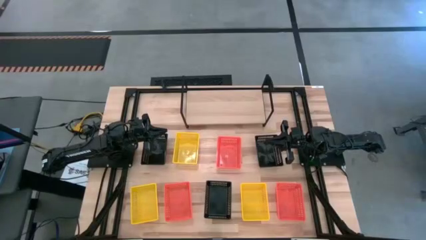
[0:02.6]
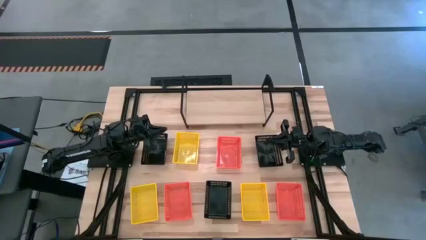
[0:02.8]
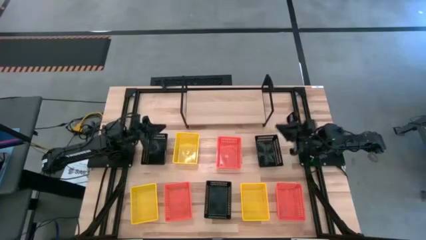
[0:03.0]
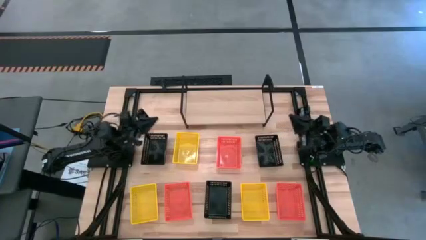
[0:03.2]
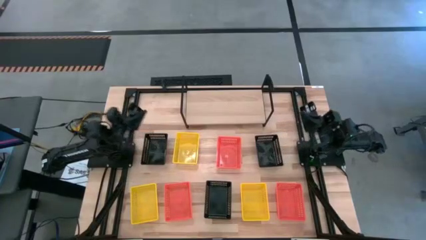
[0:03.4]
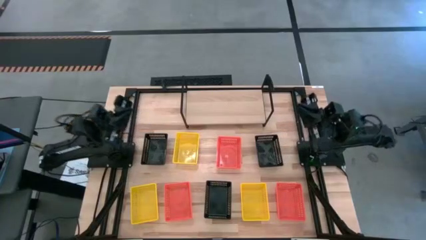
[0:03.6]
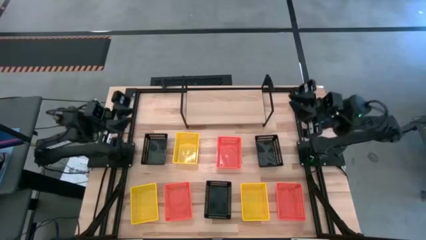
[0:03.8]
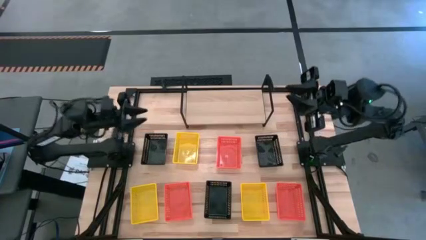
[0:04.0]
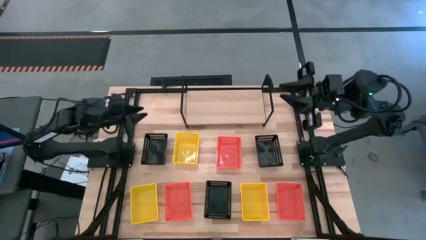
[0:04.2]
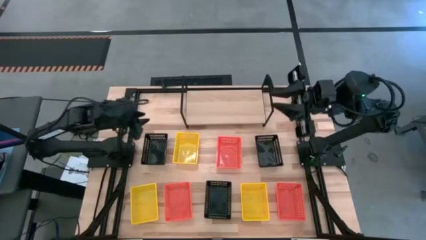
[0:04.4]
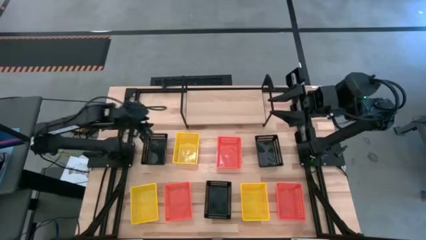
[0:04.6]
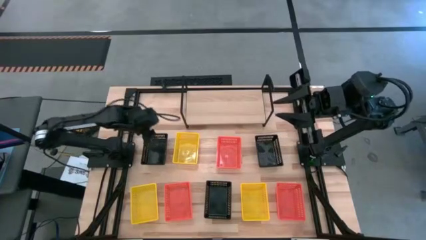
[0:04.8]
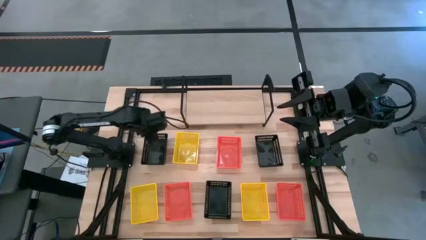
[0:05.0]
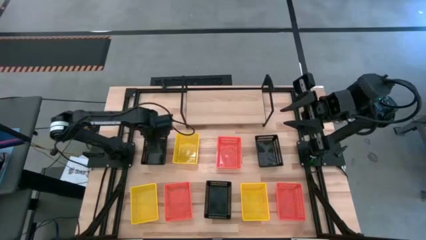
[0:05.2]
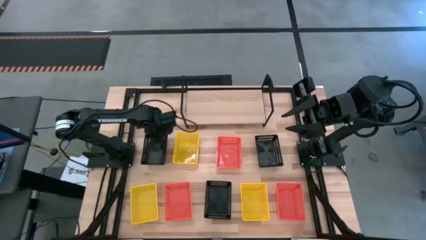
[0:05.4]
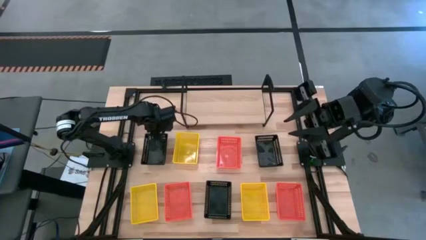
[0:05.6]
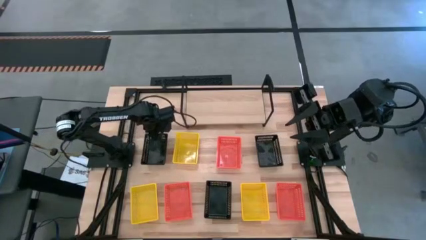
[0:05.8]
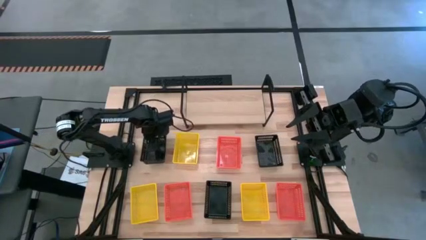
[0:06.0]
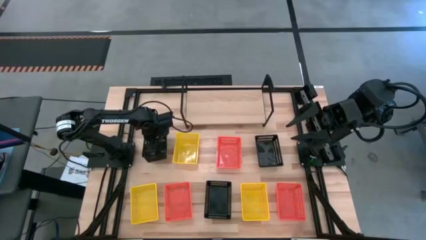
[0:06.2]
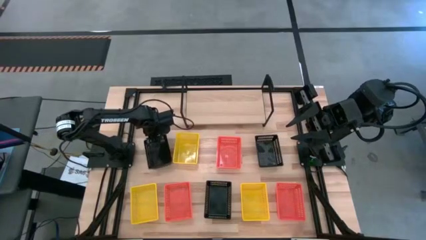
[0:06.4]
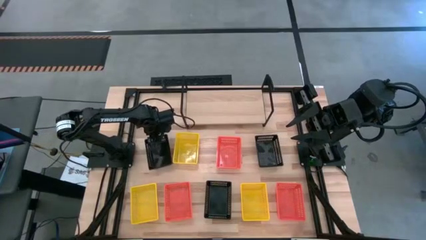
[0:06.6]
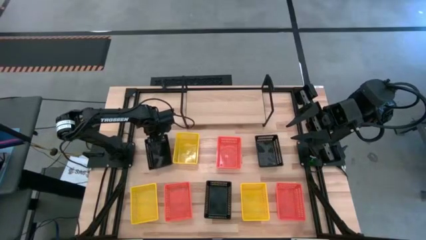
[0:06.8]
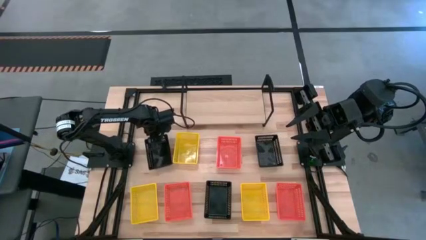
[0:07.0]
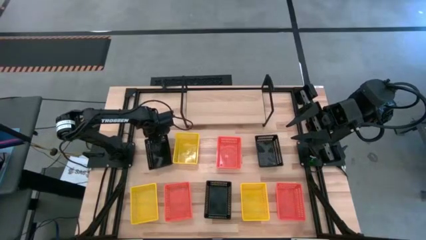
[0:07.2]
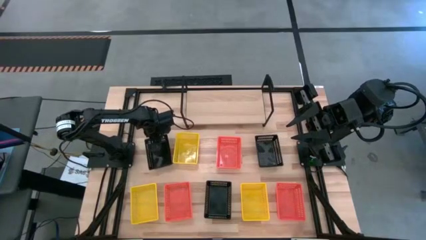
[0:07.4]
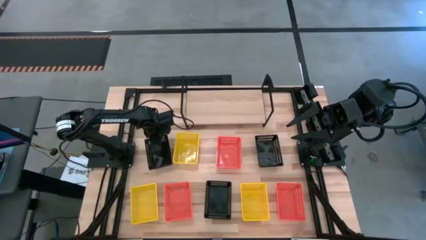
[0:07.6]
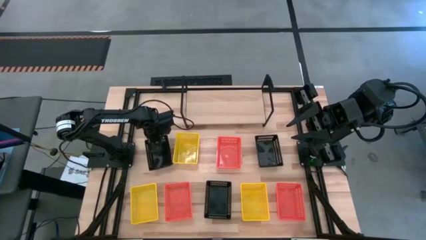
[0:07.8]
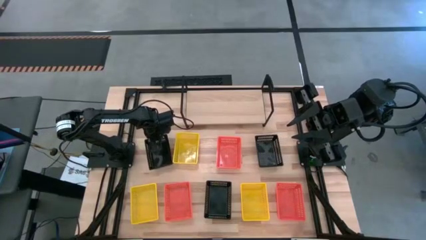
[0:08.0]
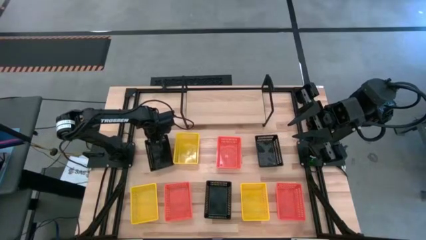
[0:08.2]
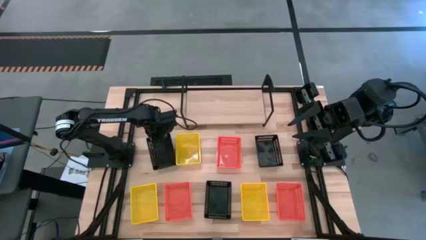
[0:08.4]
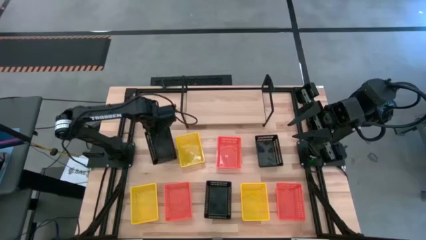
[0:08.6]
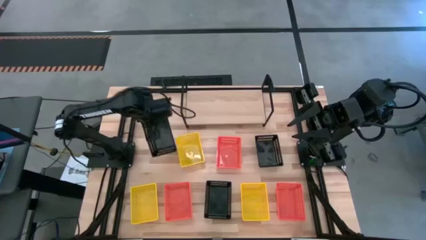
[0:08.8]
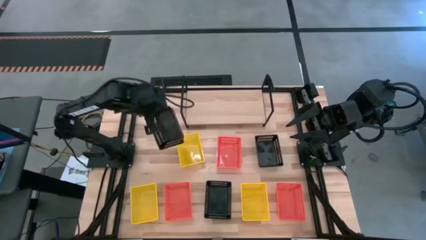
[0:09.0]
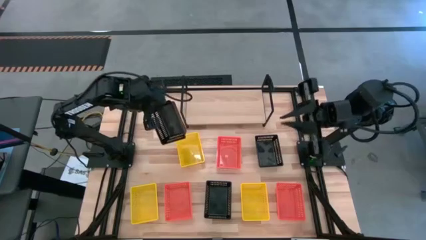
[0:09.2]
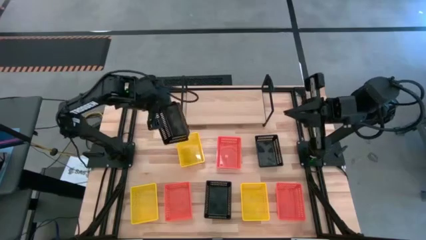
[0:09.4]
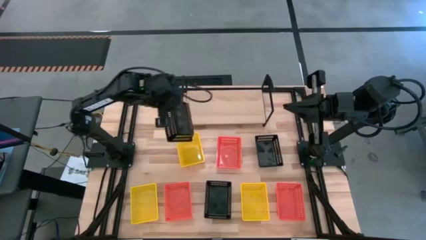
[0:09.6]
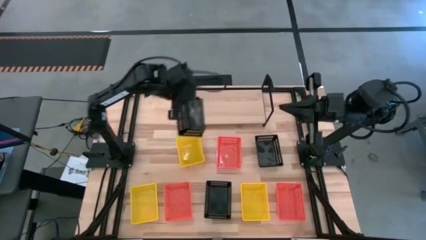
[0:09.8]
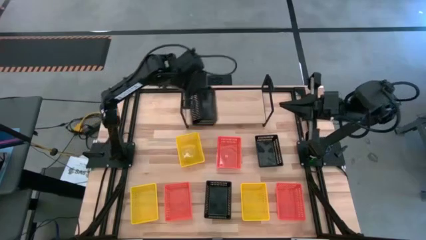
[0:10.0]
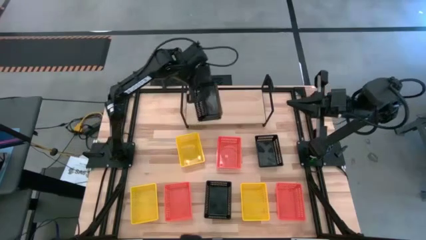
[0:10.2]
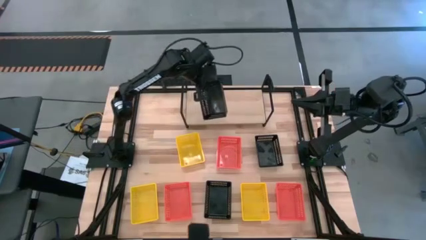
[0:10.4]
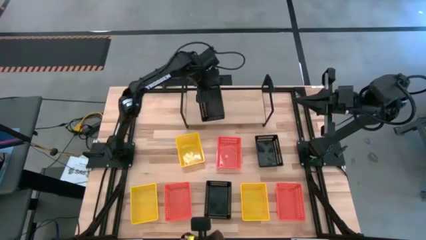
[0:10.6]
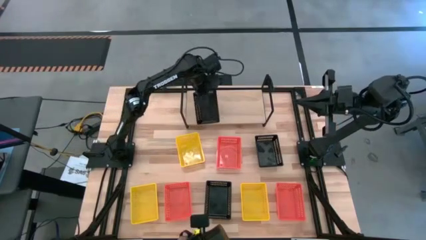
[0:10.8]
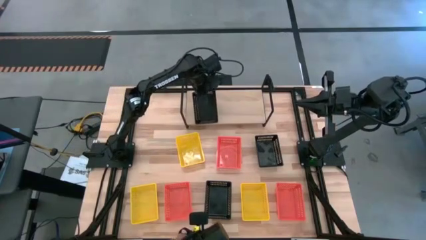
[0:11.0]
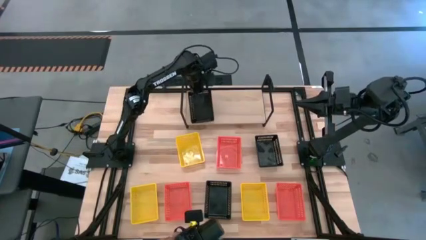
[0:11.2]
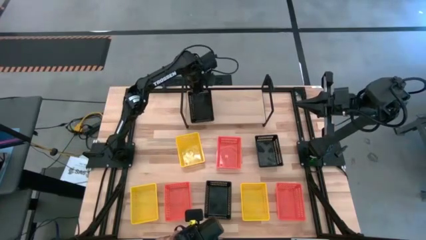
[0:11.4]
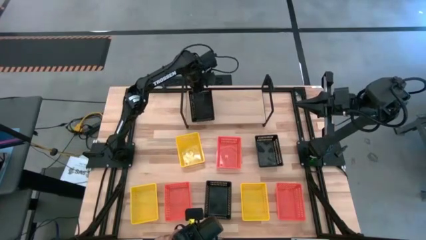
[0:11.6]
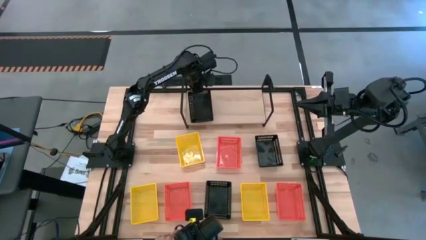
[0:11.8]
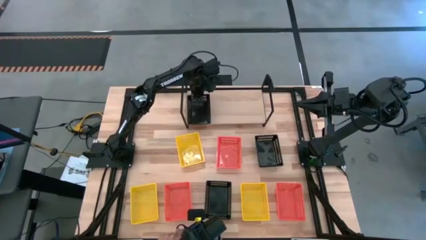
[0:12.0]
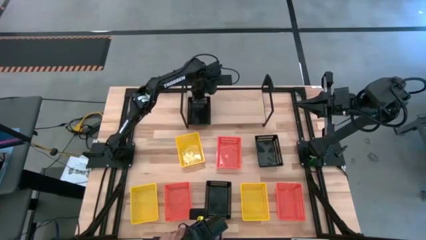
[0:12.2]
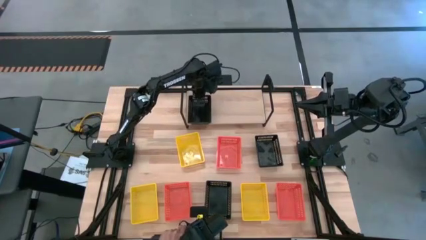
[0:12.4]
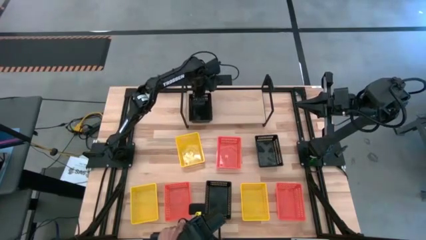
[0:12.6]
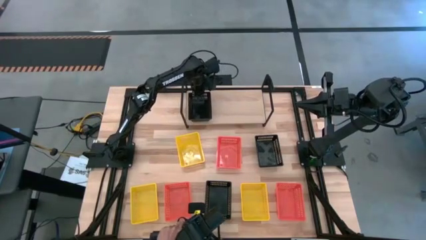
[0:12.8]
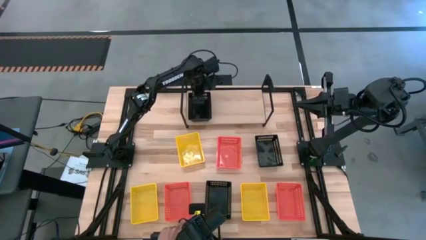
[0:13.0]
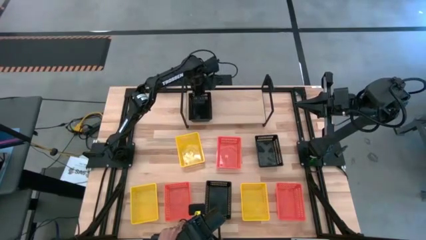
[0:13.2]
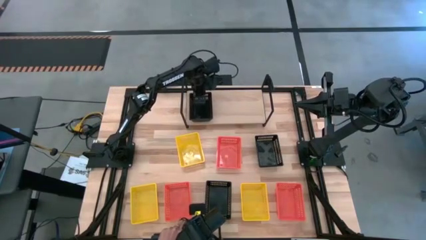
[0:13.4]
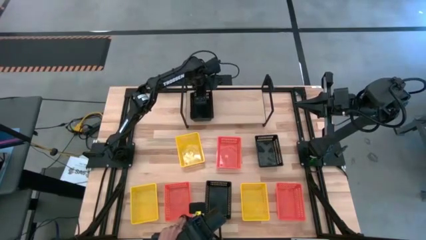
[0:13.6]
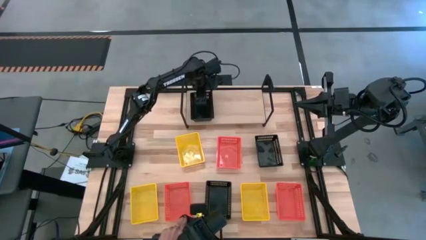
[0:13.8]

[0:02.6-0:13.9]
Task: Stack baskets on shelf by color
Put the left black bin on the shelf

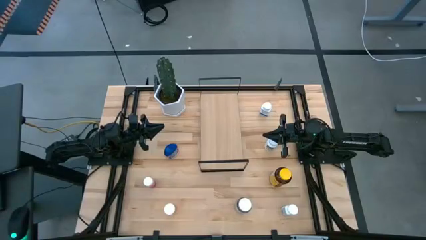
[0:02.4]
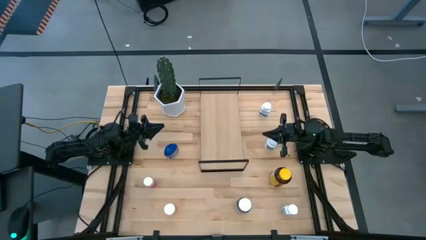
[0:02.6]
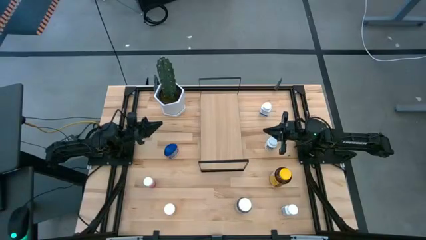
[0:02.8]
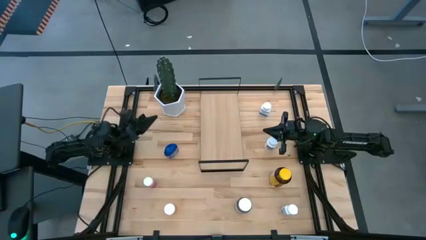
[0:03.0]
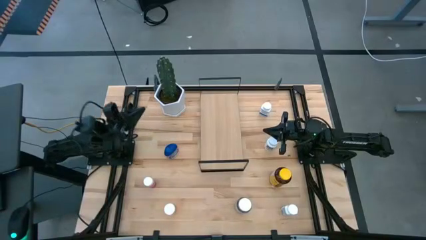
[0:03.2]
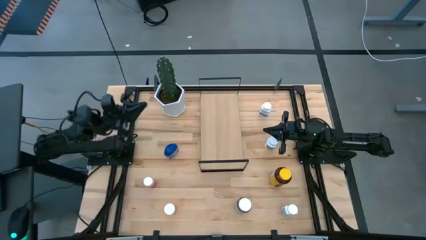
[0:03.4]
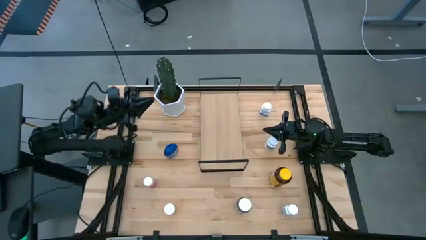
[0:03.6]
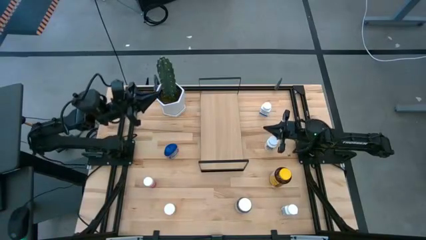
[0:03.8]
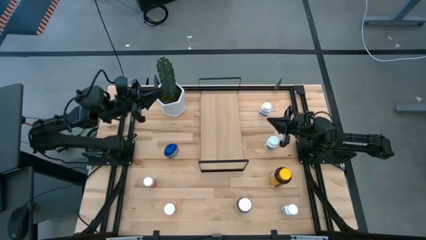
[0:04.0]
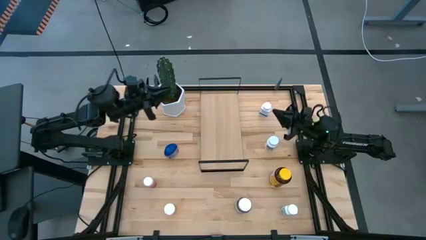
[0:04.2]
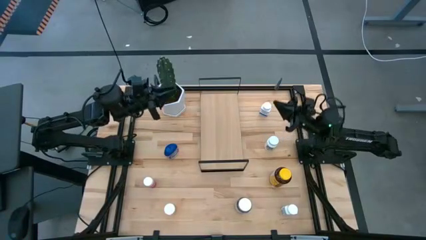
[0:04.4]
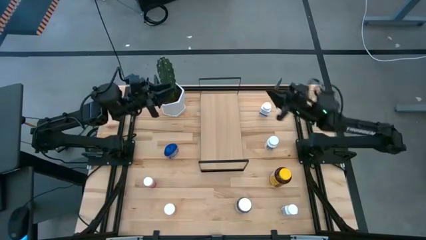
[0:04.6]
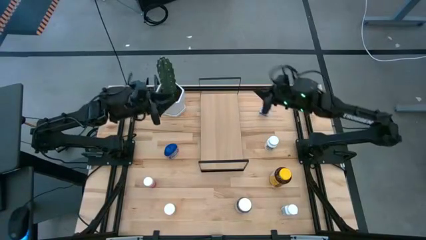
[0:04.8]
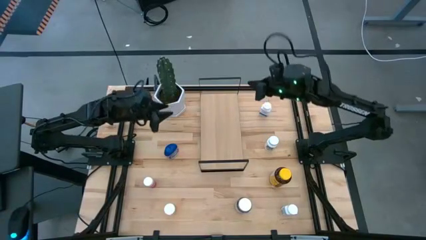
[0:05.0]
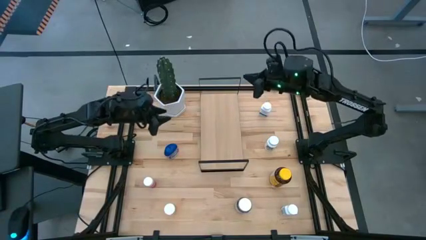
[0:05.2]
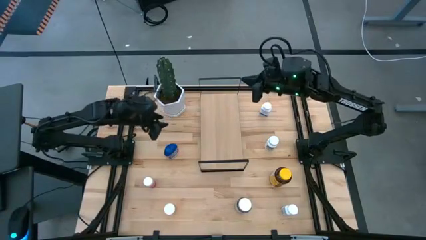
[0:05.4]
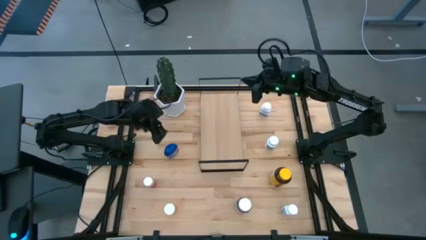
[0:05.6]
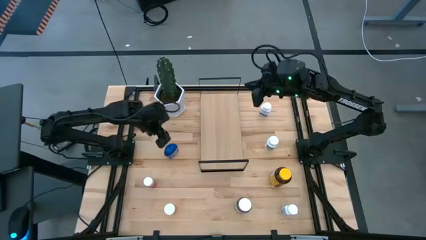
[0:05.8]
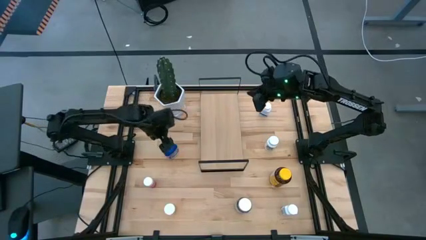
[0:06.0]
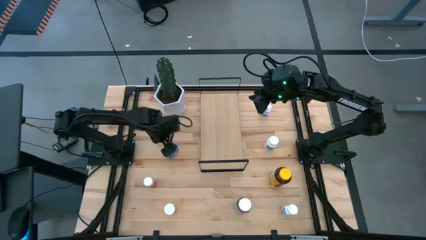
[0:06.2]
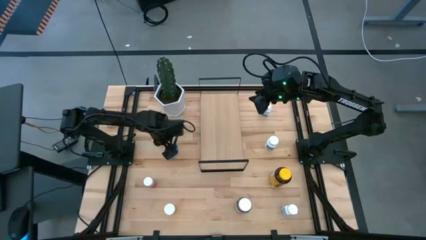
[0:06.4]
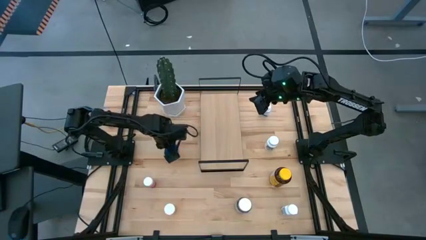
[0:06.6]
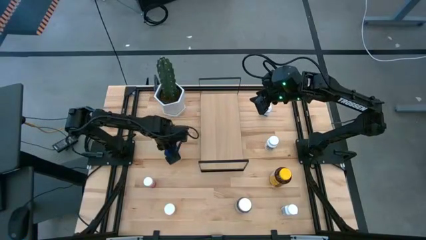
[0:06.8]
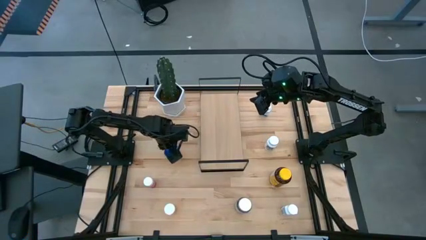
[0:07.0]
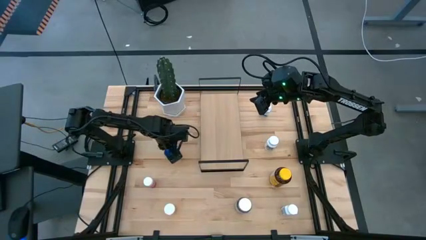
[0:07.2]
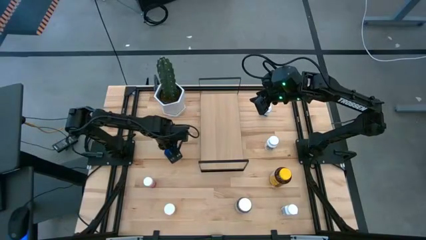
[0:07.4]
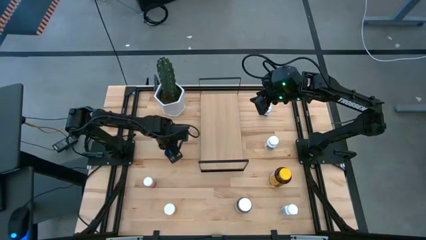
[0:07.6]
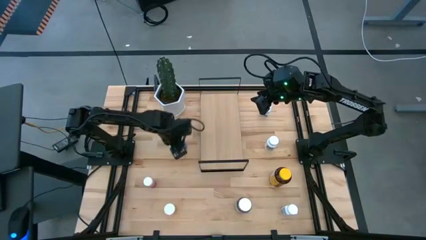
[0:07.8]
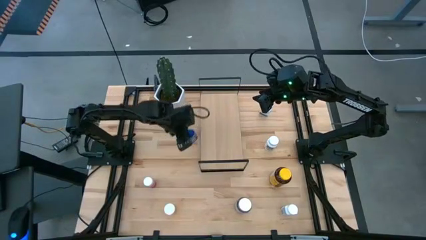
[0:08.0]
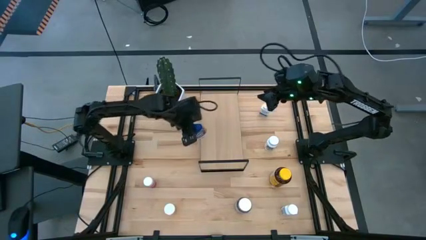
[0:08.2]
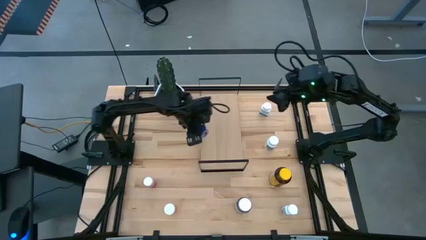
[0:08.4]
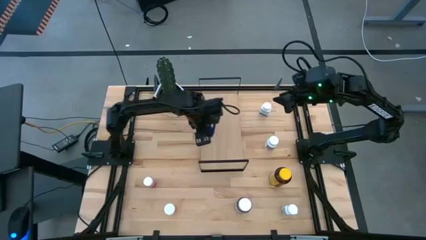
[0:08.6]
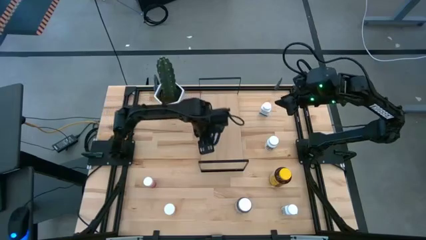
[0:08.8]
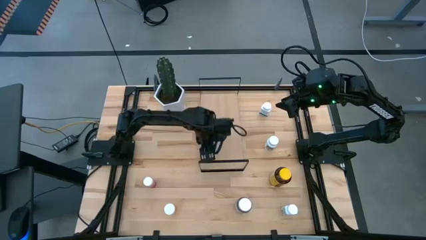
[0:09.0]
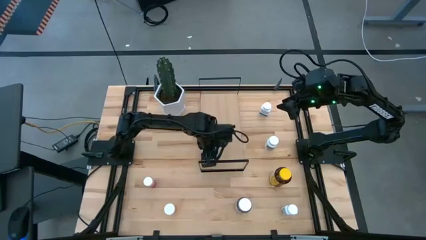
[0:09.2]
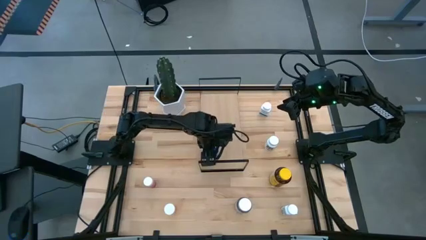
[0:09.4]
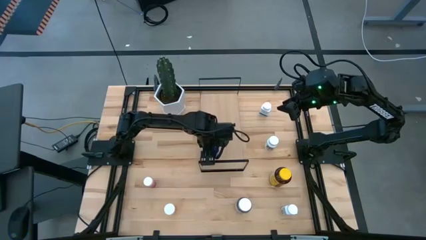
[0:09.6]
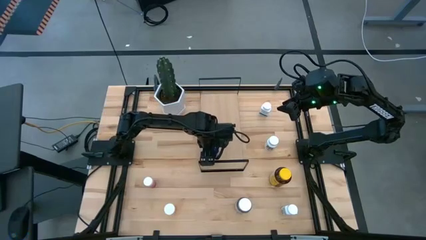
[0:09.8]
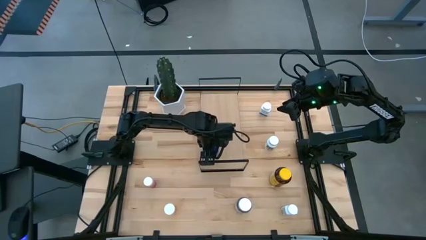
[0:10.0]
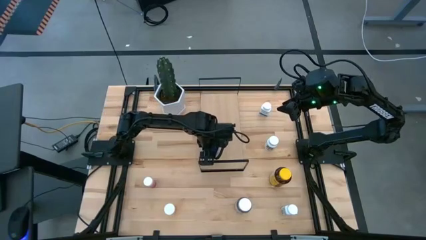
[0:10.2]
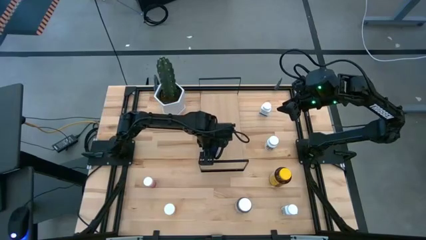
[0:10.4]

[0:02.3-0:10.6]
Task: Pick and place medicine bottles onto shelf by color
Put the blue medicine bottle on the shelf
